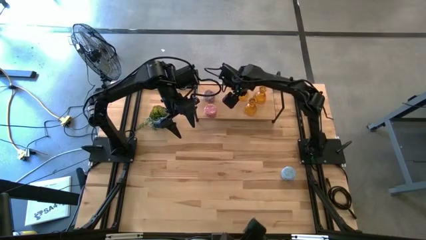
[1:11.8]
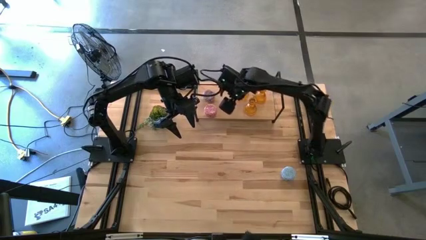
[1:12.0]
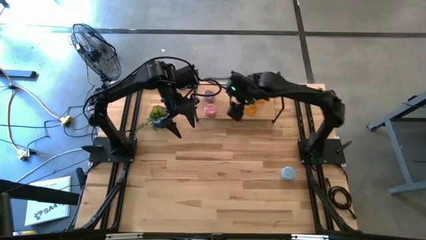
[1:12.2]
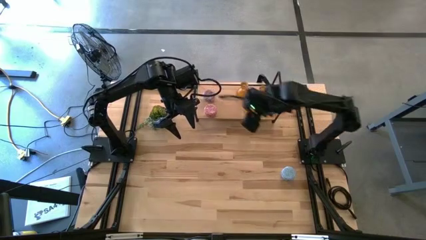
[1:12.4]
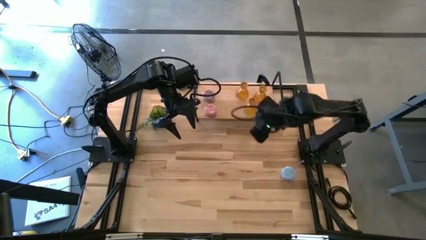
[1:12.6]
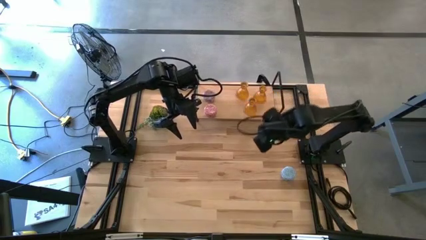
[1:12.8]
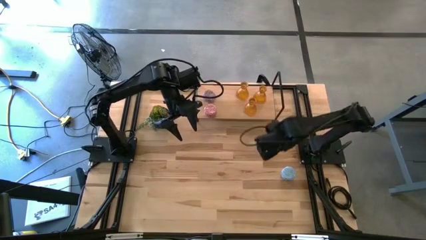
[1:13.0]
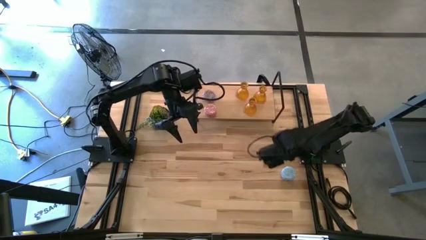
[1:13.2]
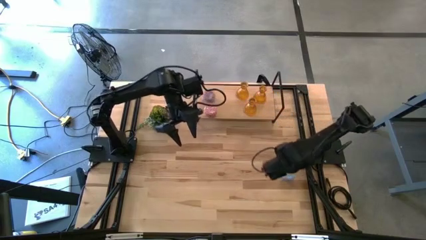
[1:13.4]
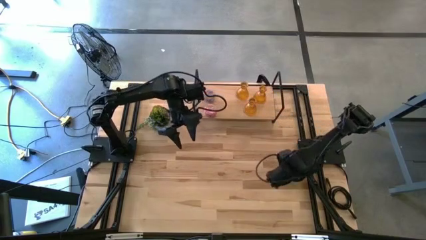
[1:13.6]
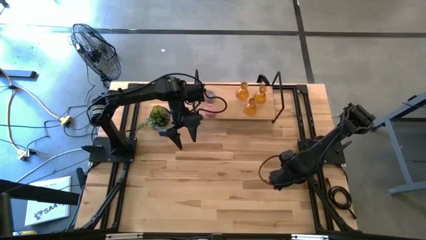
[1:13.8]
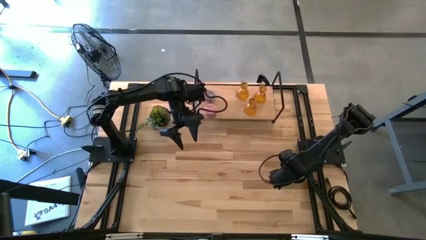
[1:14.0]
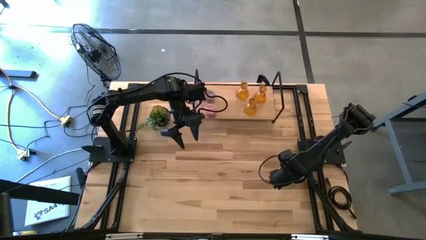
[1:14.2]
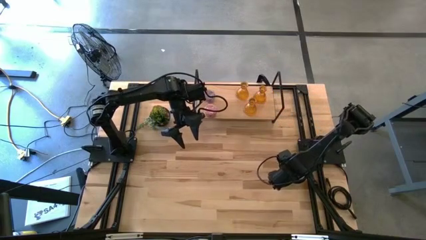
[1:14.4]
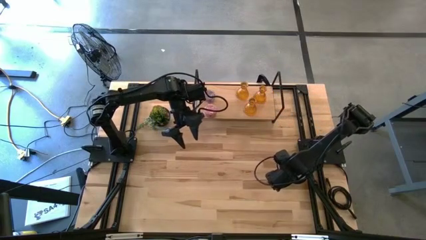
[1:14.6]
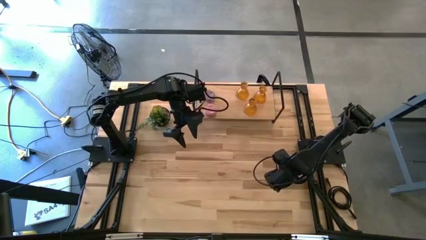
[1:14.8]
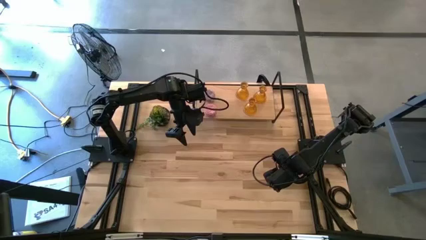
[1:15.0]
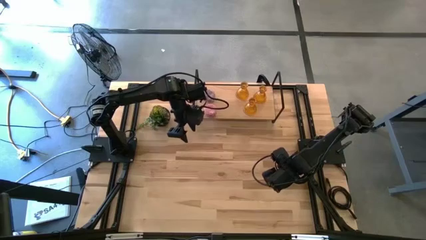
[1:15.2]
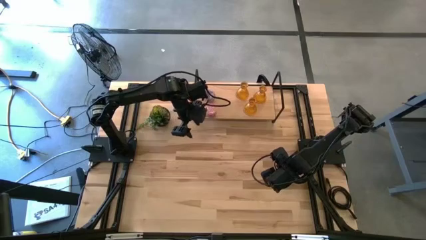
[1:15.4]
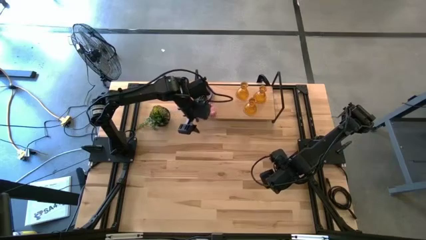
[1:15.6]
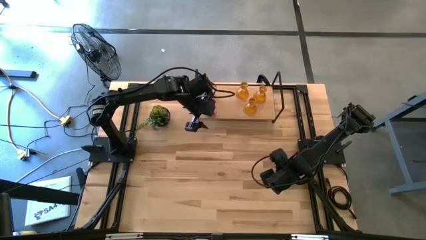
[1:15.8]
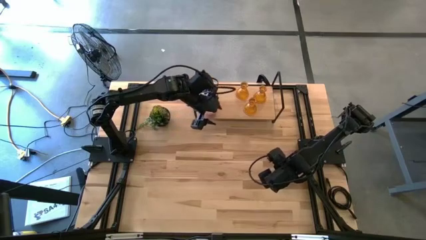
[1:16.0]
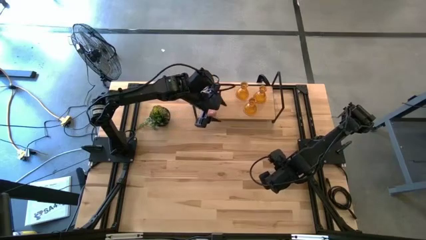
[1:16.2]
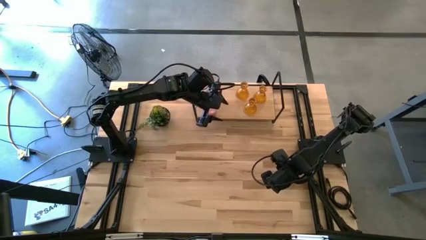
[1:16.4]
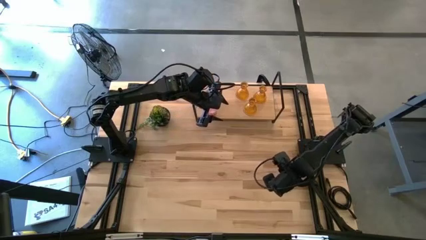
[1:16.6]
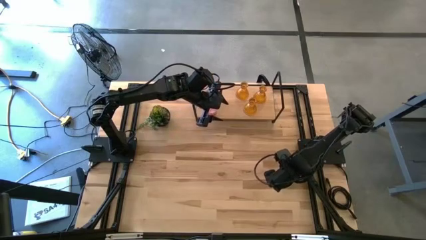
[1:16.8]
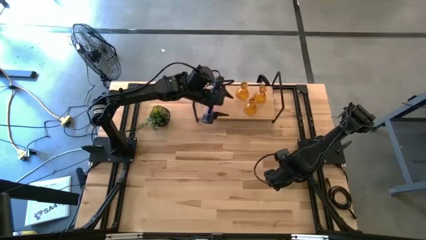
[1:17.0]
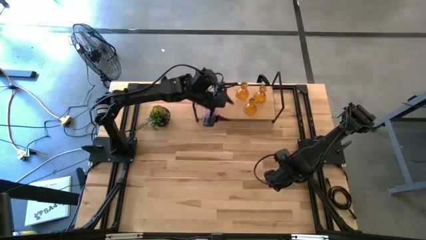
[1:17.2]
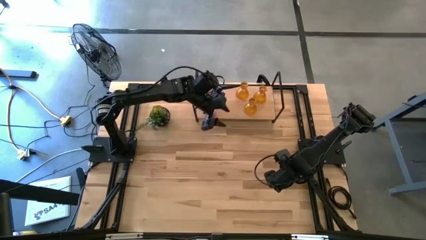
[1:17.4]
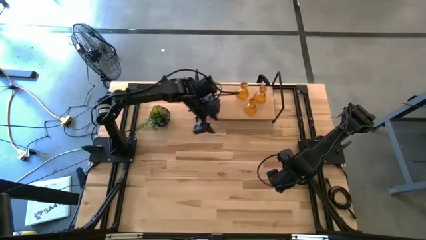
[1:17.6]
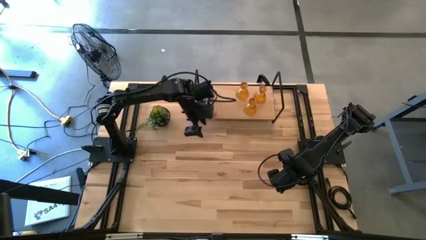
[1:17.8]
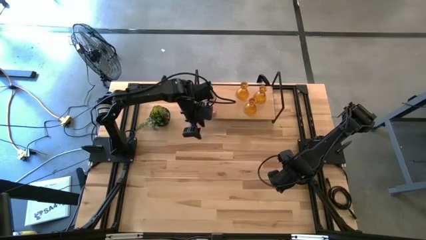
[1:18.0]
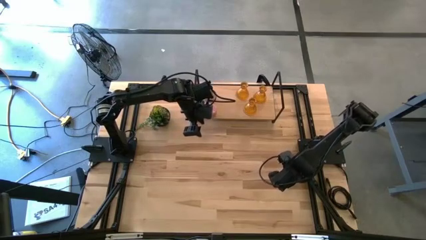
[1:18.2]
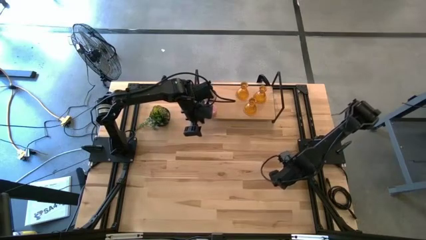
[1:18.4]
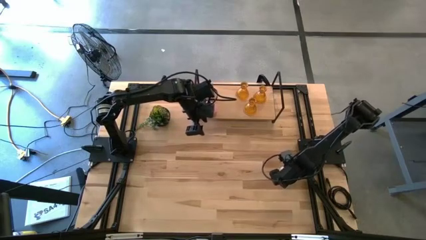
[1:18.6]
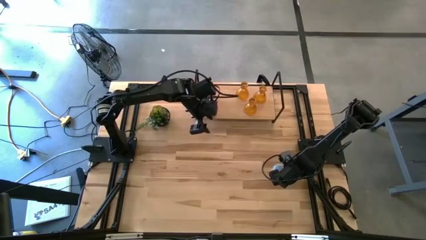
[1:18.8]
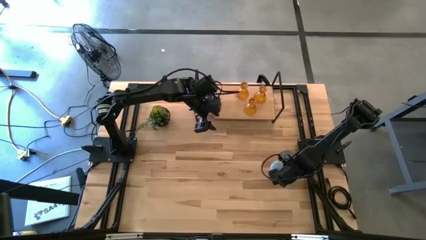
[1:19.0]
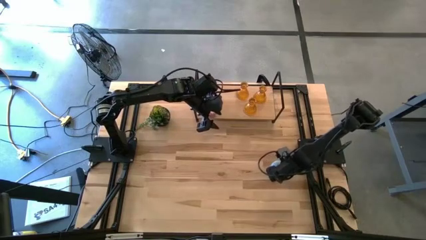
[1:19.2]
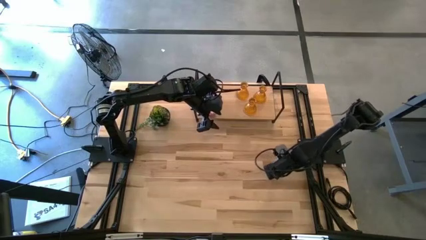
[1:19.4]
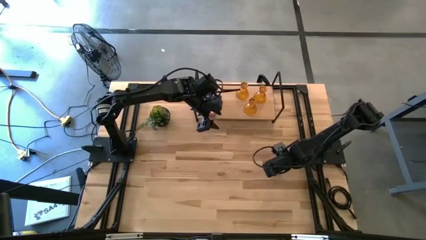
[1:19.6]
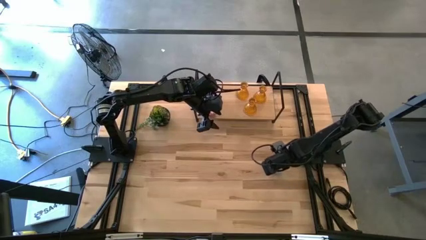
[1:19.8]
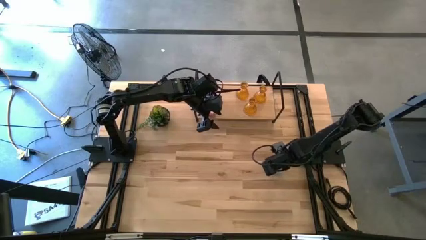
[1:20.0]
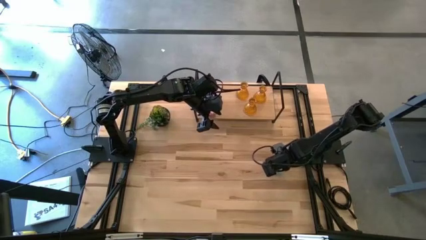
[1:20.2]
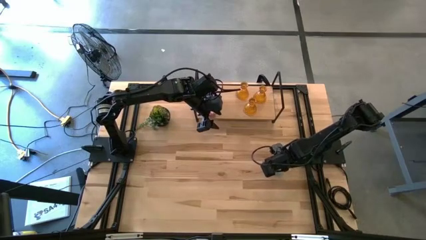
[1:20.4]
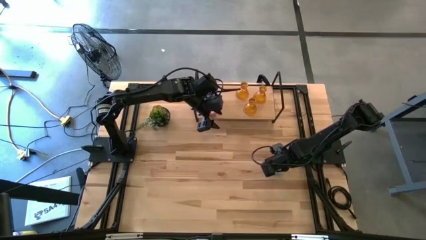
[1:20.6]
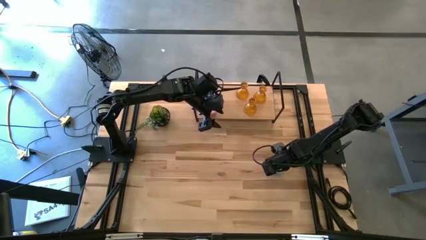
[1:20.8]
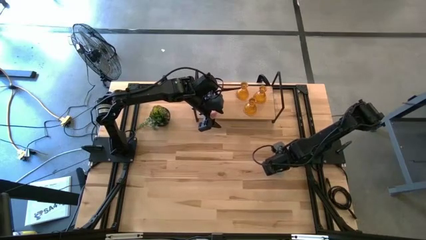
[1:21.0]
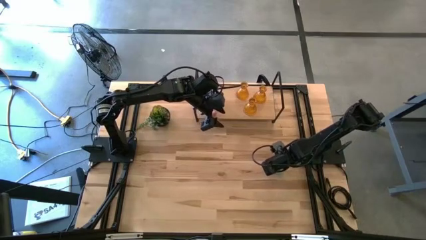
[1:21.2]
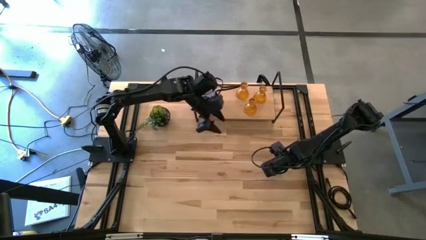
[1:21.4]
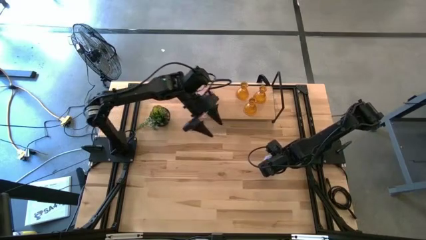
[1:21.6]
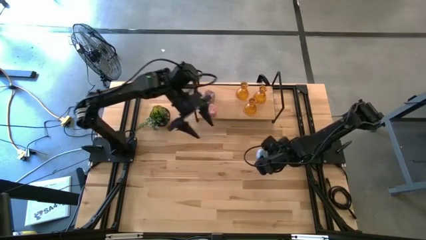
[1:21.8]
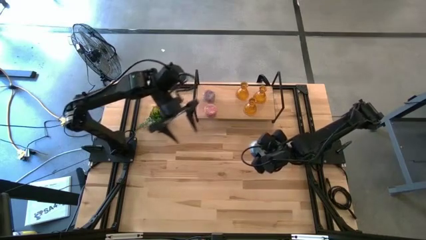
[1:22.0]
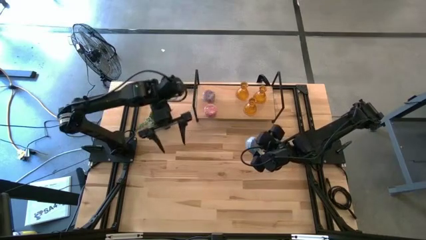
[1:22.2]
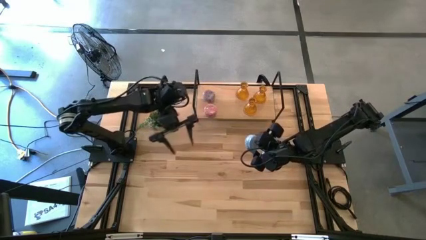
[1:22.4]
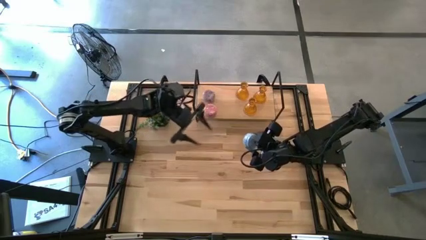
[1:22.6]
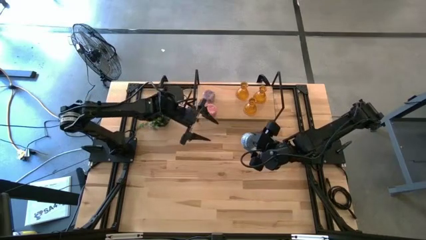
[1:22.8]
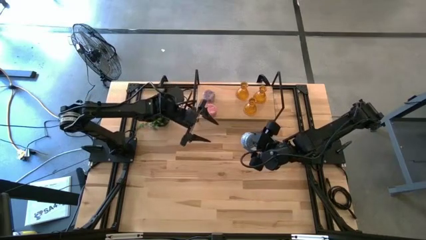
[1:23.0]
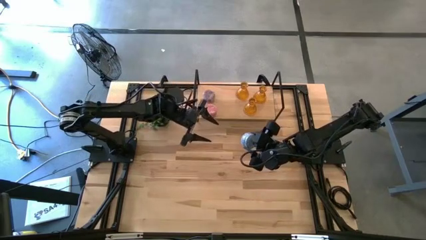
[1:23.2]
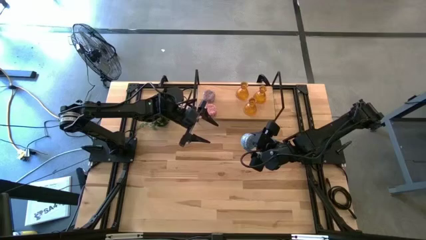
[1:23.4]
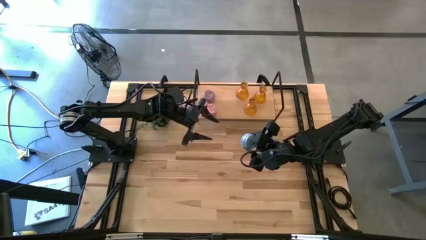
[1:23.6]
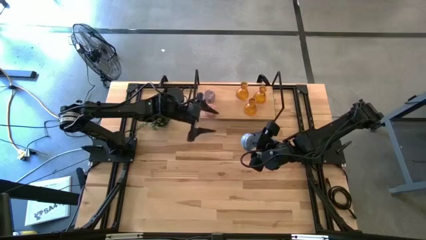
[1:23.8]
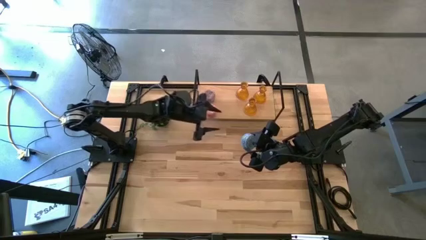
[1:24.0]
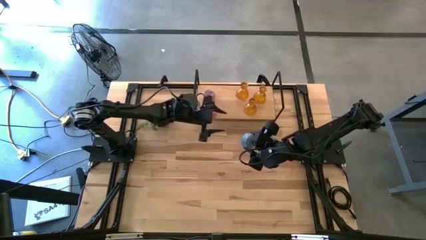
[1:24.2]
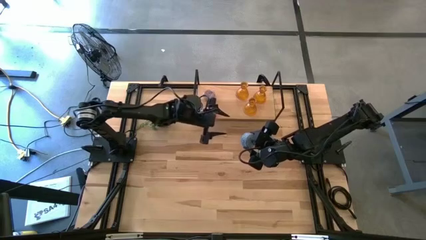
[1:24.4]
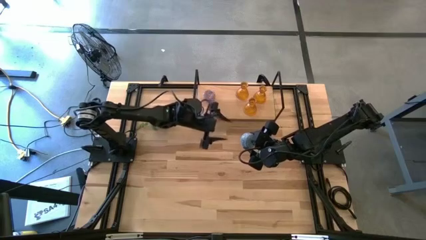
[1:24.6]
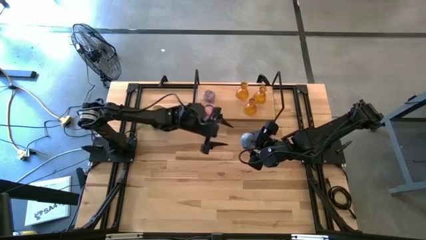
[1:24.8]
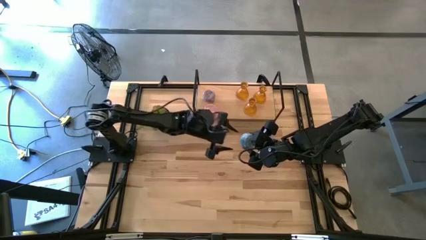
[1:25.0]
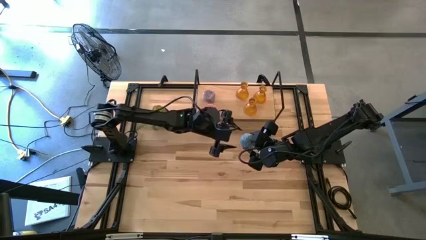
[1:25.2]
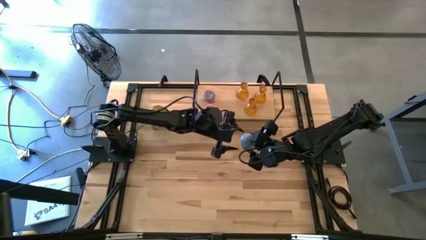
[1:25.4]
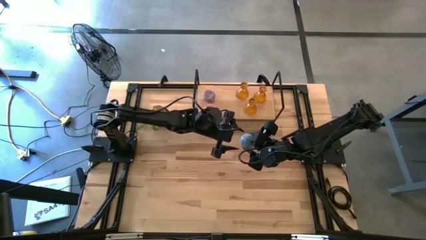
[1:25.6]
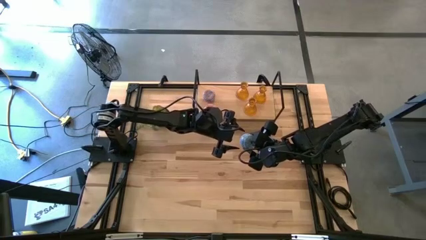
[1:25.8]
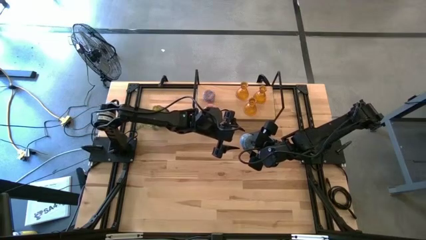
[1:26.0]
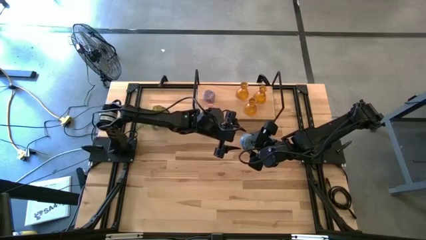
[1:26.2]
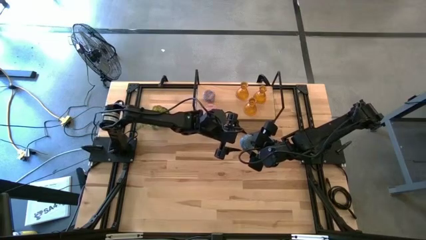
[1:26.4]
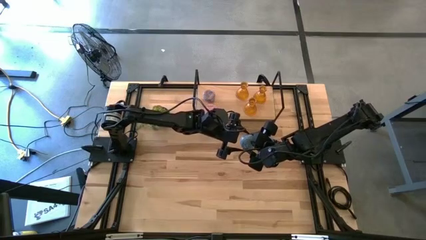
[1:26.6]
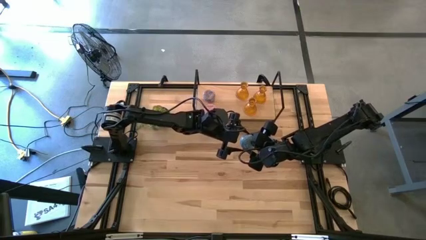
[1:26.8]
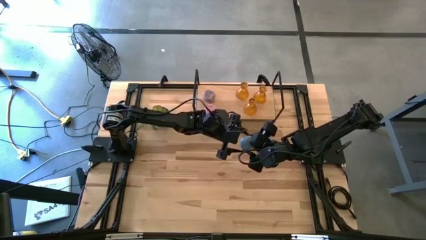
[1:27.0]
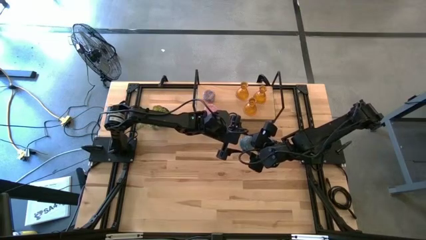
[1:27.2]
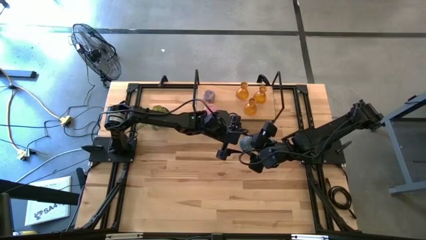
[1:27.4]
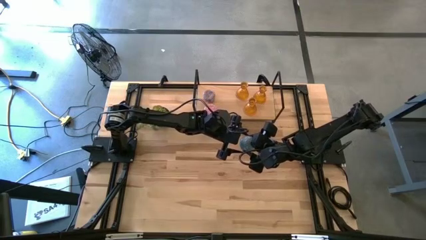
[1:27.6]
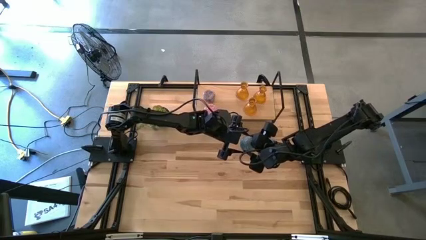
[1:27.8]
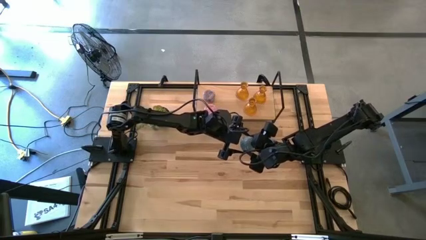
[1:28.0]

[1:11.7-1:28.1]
Task: Pick & Place candle stick holders
Put the blue patterned scented candle on the shelf

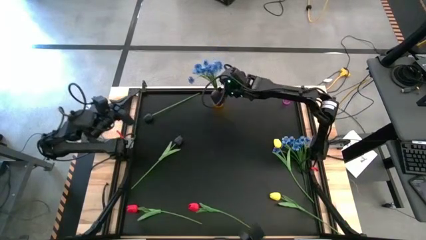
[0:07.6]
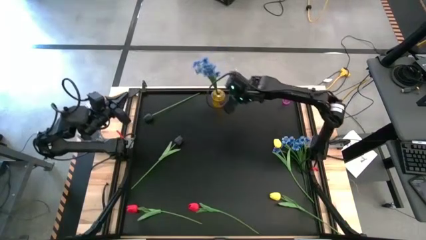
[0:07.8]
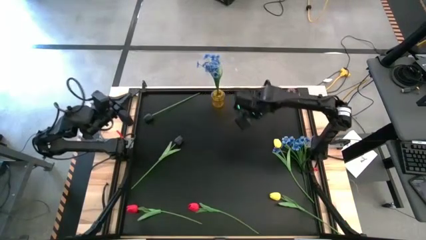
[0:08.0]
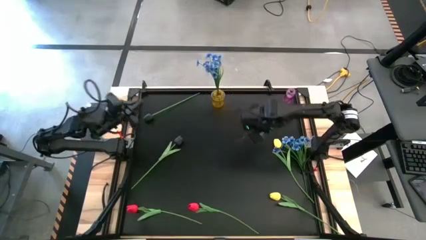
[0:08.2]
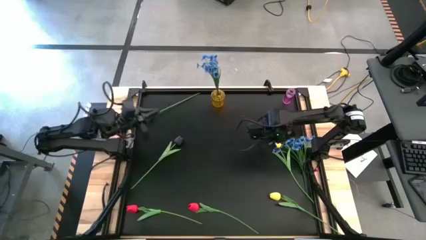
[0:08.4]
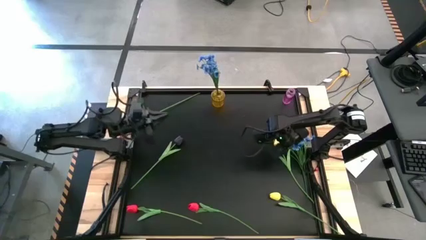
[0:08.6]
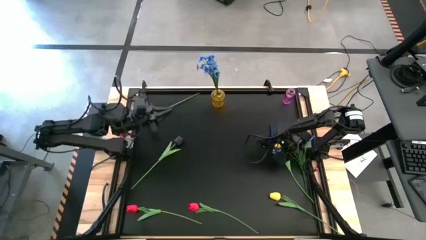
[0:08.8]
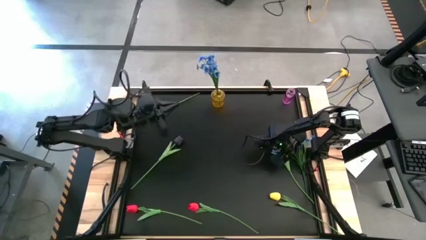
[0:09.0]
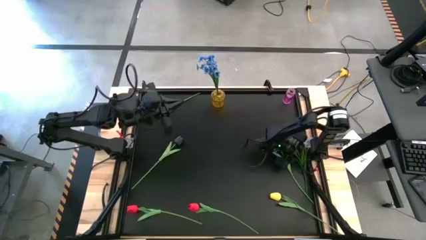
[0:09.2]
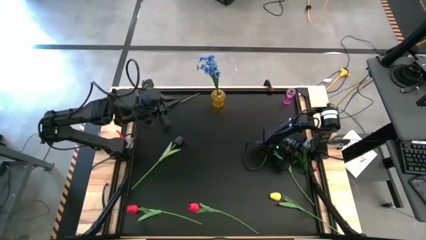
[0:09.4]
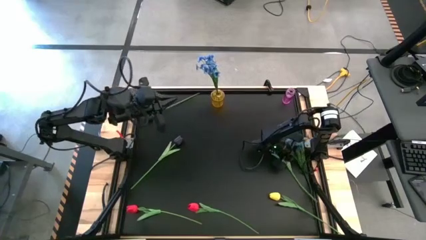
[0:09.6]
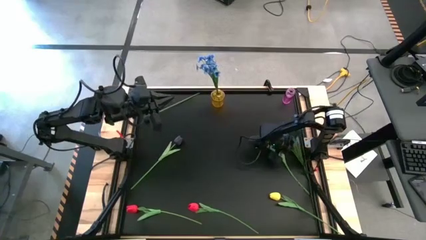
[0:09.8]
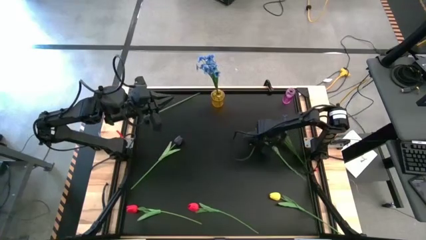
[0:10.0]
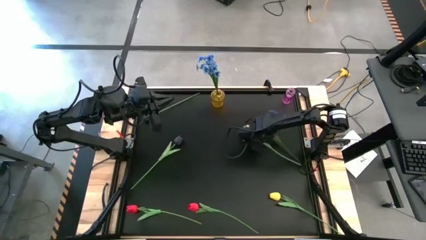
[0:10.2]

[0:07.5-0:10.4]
Task: Sort flowers into vase by color
Put the blue flowers into the yellow vase
